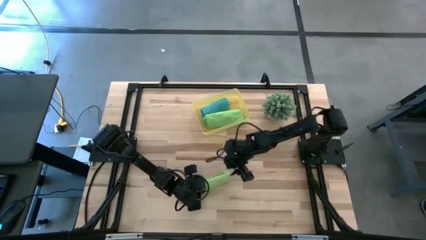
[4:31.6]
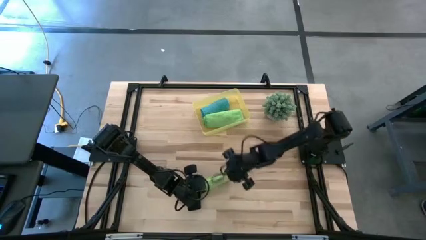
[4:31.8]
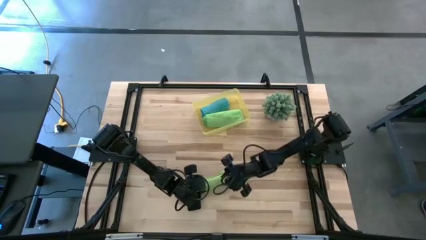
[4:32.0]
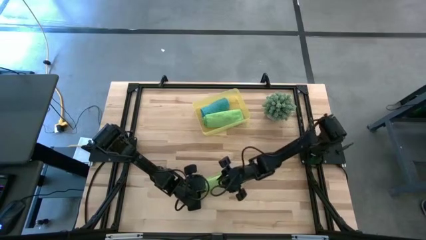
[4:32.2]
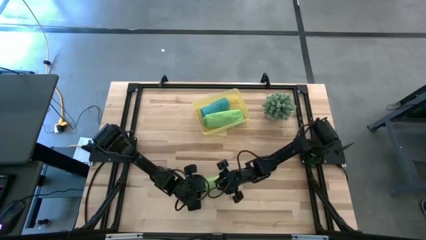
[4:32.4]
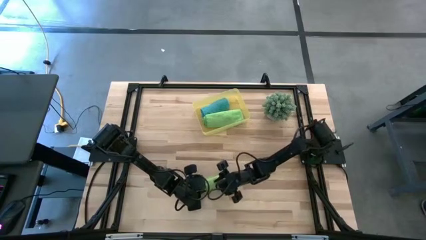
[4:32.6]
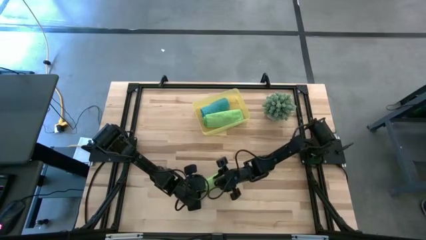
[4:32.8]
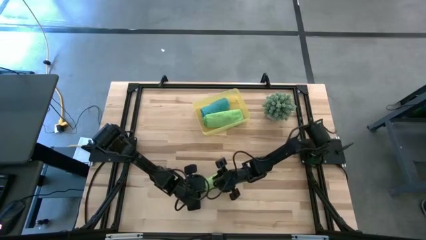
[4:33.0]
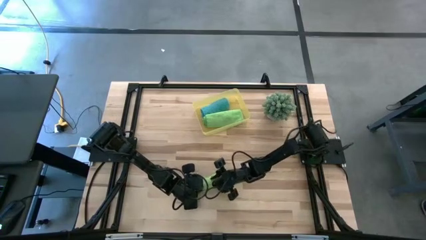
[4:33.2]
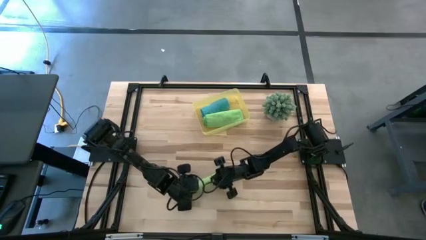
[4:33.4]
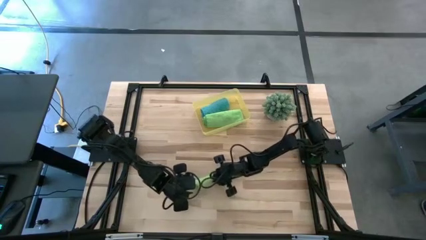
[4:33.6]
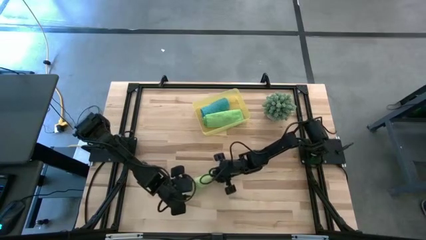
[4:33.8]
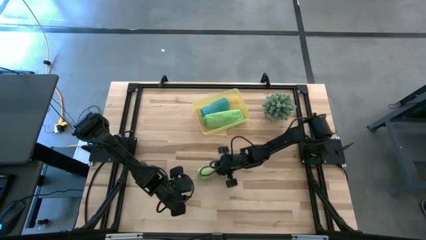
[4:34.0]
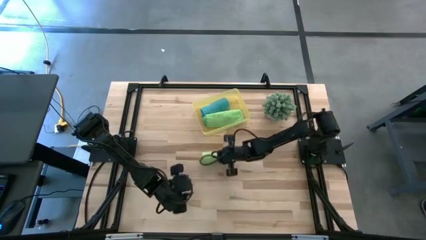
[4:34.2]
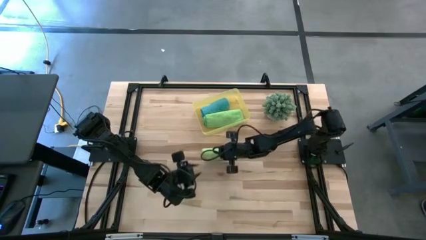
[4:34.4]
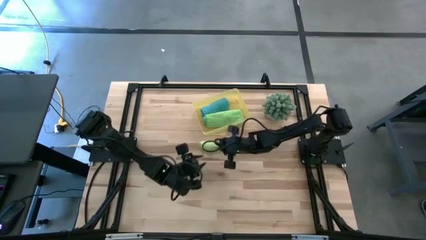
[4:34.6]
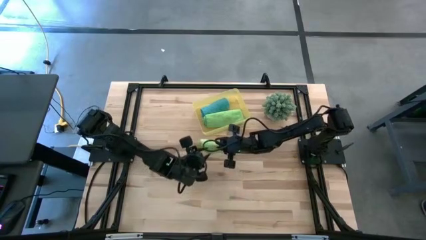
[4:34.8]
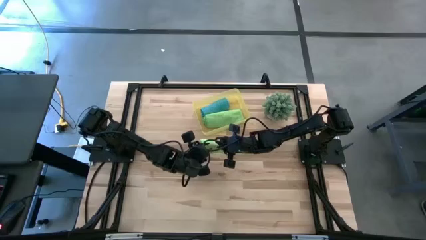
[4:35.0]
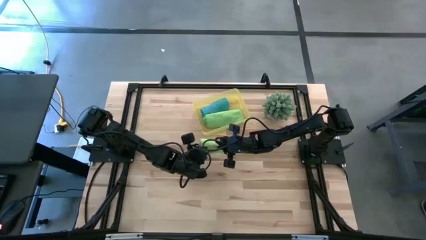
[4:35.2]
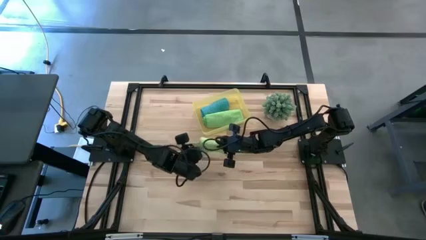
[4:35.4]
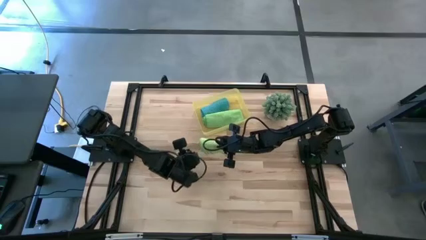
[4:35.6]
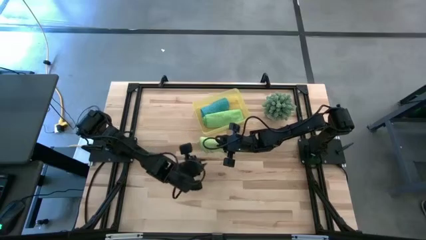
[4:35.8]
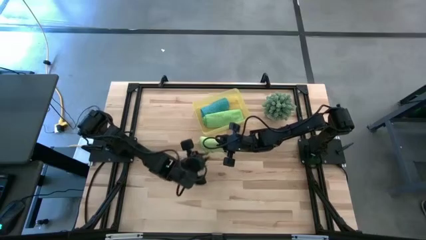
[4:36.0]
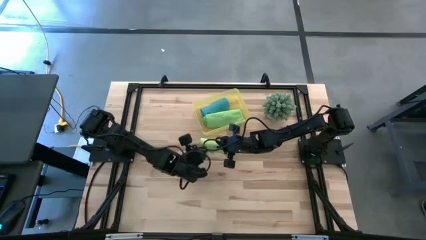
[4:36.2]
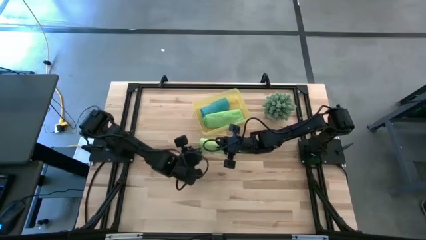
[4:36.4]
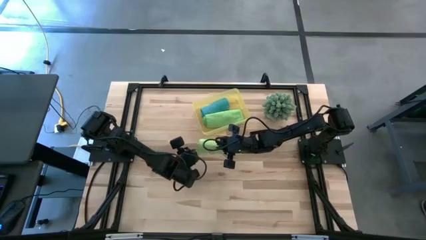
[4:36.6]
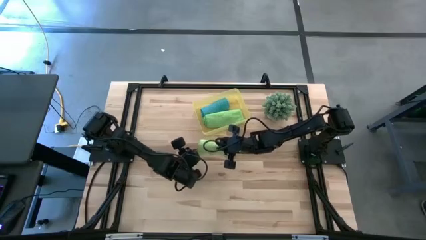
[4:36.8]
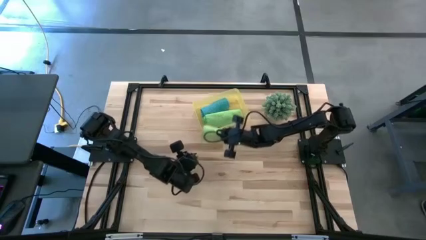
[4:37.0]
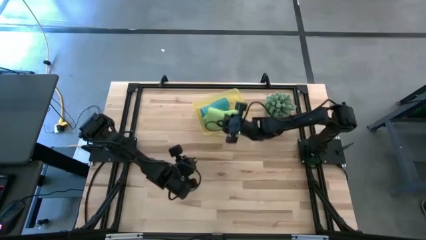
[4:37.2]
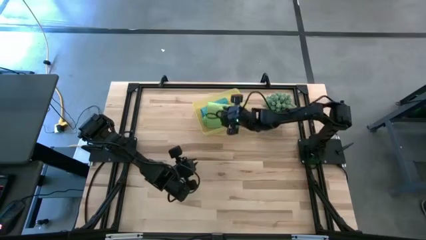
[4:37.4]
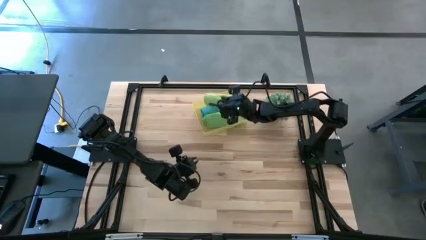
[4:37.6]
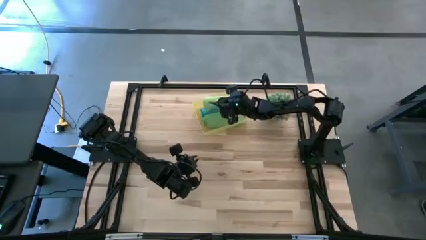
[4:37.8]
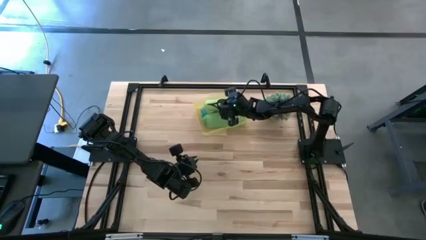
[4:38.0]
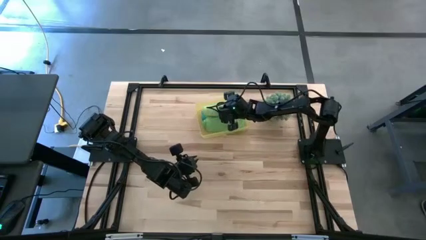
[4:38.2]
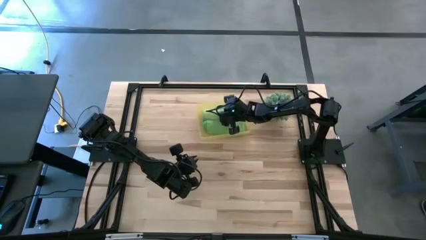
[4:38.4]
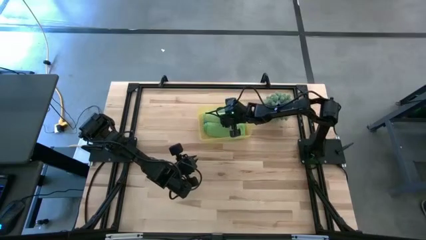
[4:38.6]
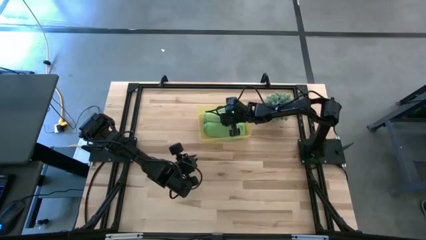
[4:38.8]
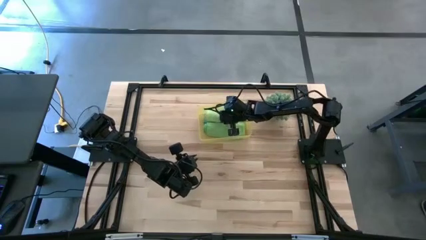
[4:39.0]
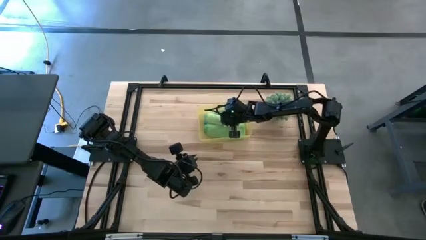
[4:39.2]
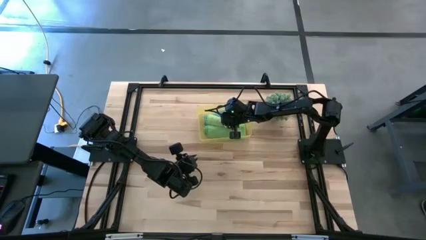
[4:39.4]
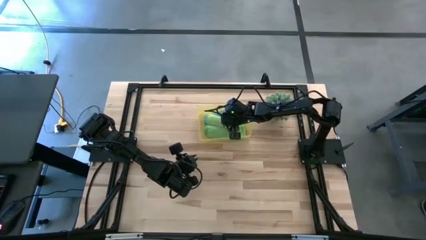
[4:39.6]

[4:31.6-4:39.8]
Task: Roll microfiber towels into tight, uniform cylinder then place into a basket
Put the light green microfiber cloth into the bin

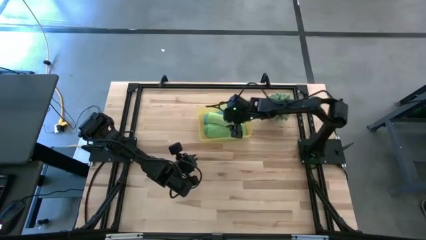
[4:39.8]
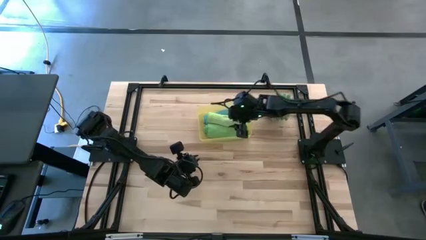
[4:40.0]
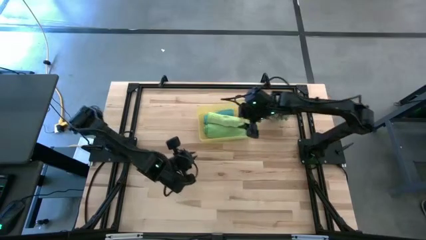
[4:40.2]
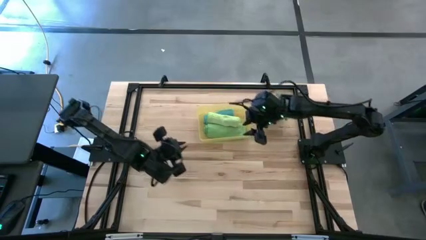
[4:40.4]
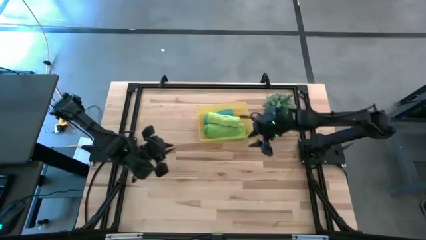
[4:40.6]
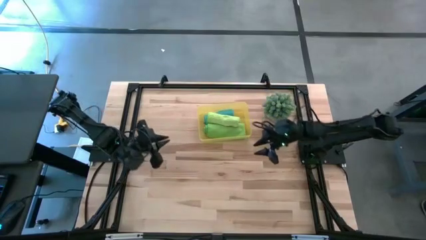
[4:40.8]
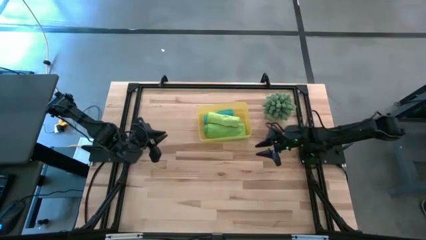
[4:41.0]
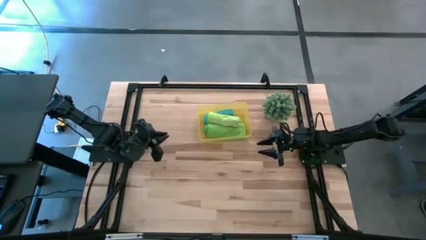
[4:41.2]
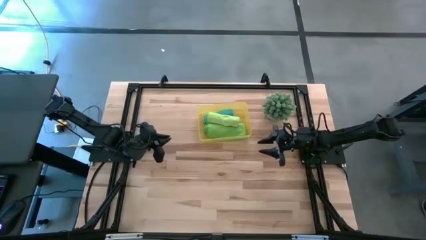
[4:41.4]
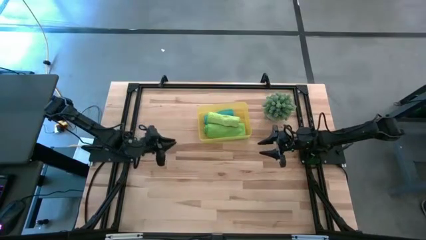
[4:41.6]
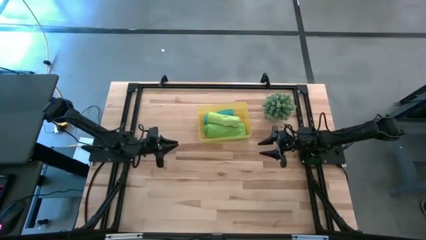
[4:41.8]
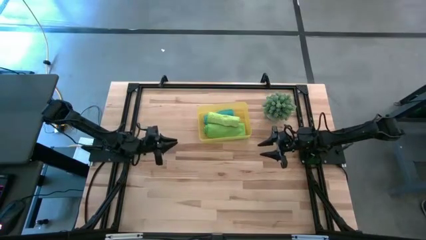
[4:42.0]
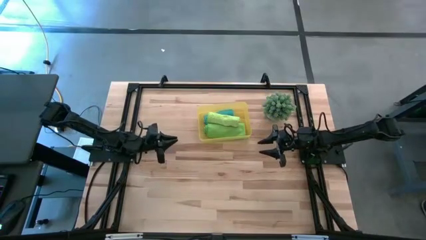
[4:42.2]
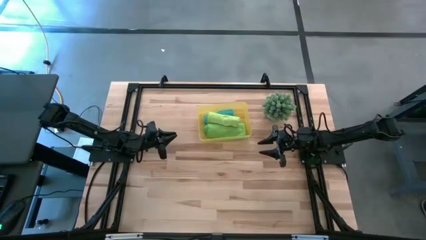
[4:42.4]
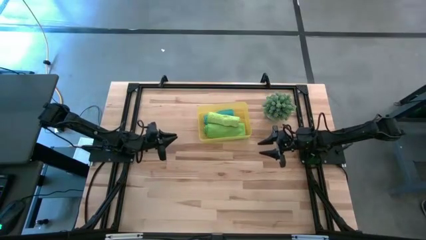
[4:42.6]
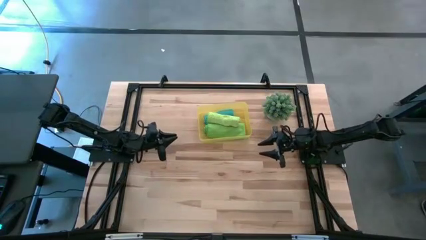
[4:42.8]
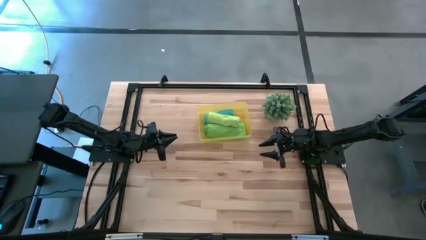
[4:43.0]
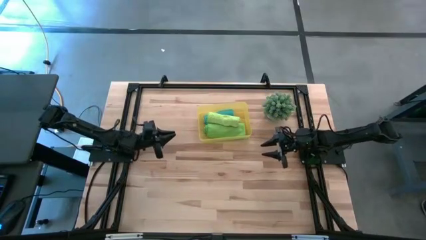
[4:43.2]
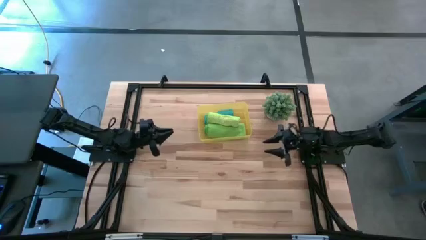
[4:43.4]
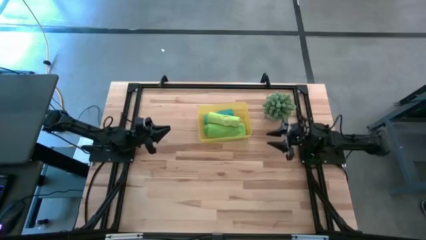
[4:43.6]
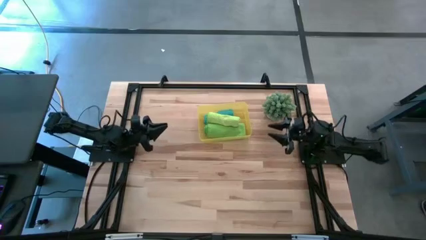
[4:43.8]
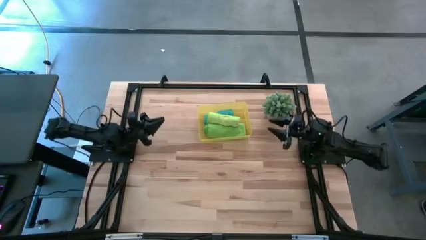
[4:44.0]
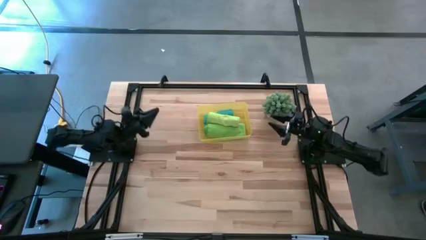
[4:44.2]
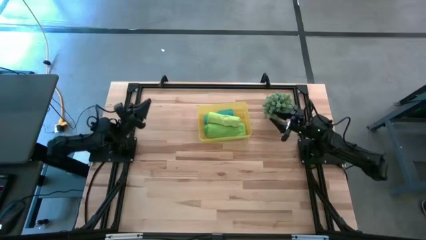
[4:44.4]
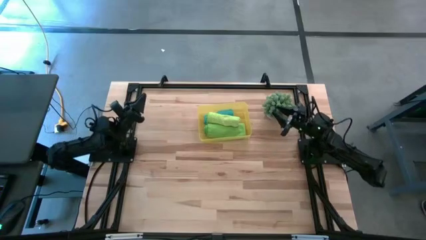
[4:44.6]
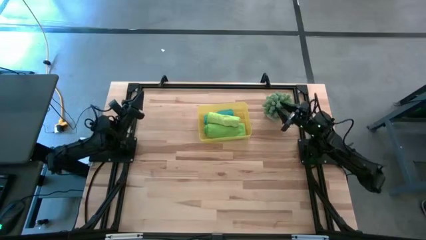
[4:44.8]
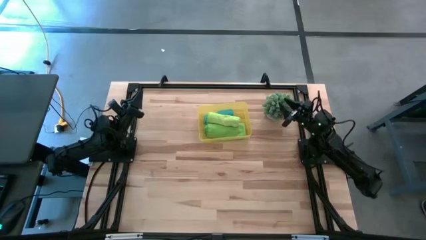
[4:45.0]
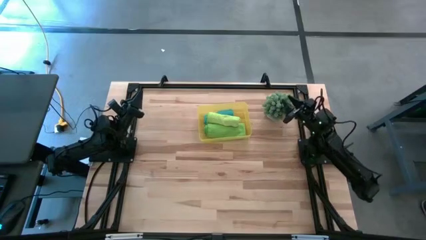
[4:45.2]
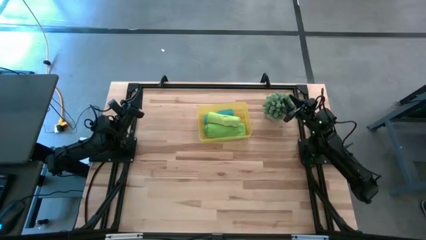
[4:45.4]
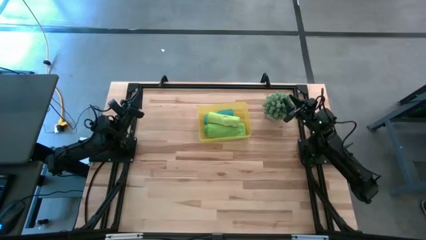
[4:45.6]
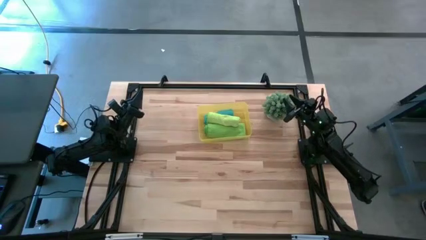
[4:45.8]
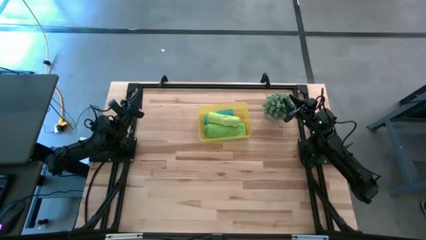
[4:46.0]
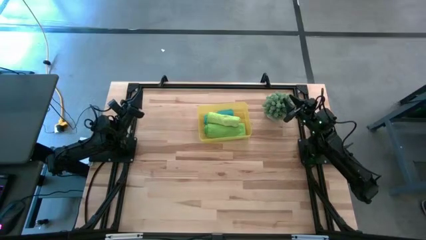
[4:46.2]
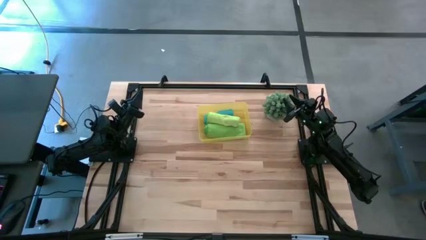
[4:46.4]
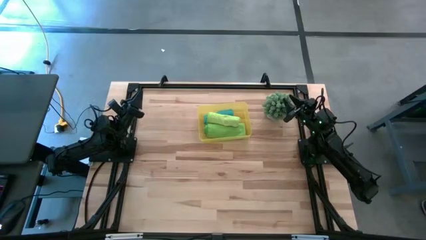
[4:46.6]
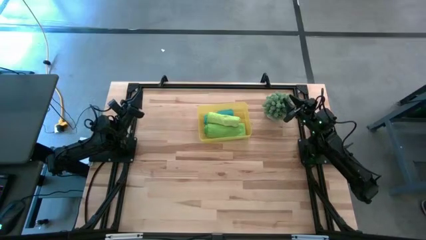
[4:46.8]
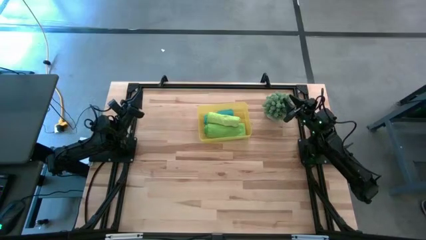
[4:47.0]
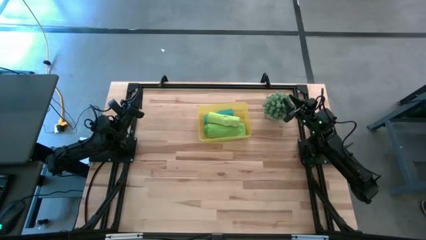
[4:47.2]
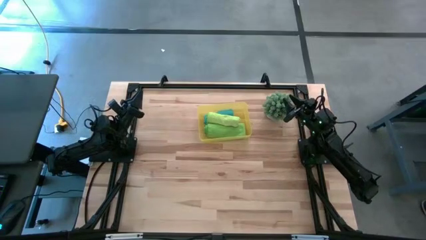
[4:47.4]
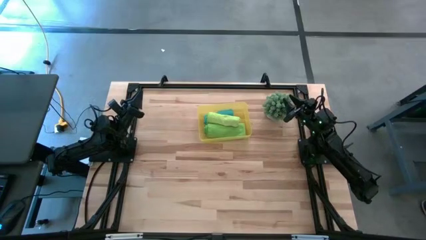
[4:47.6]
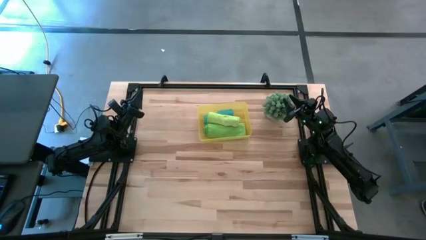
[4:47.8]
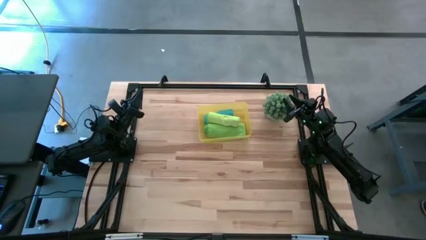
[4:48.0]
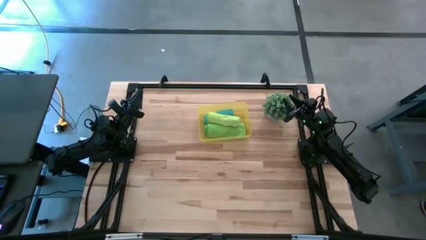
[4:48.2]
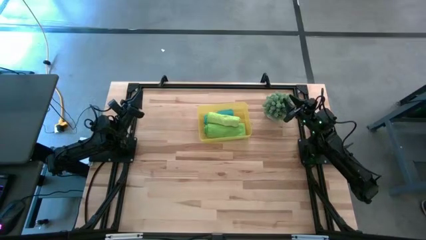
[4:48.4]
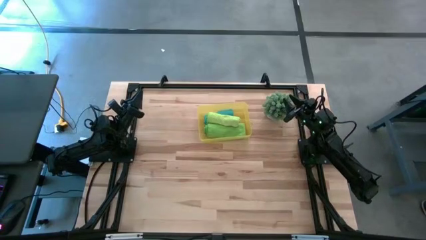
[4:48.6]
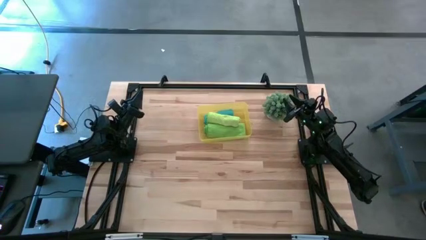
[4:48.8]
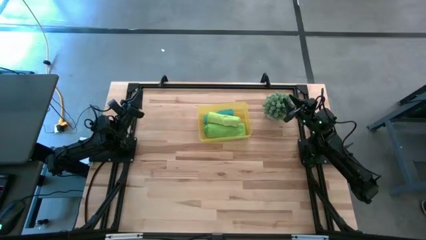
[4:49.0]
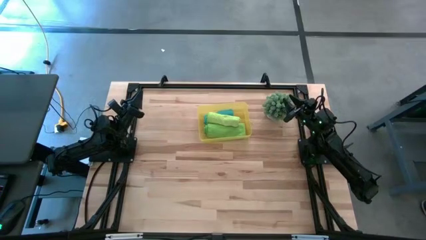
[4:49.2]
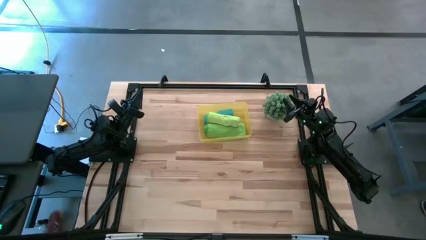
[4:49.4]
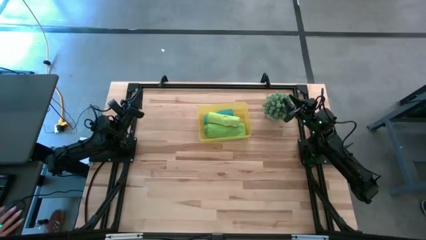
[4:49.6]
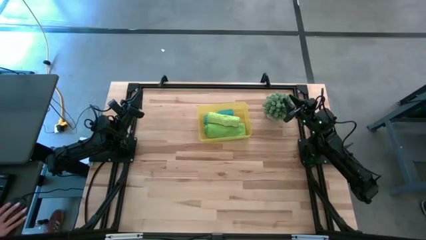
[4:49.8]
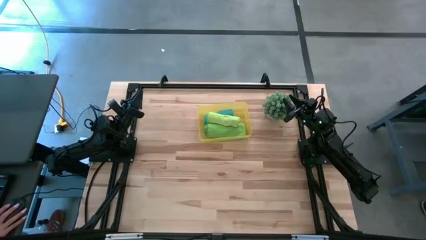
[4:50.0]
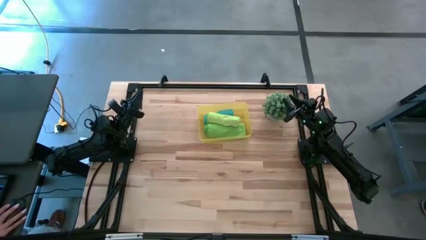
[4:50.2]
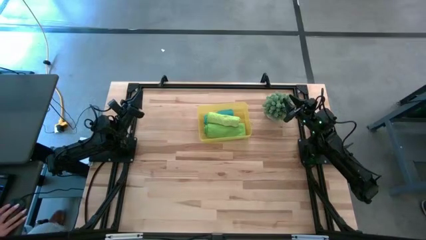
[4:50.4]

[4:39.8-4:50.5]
Return to Home Position
